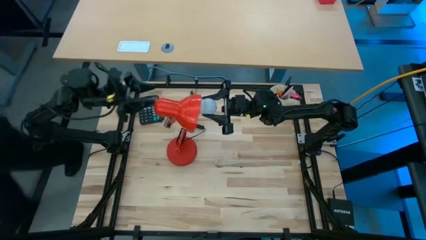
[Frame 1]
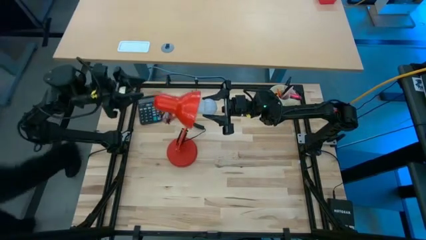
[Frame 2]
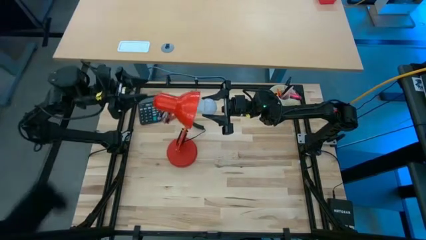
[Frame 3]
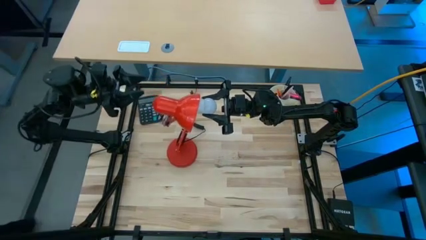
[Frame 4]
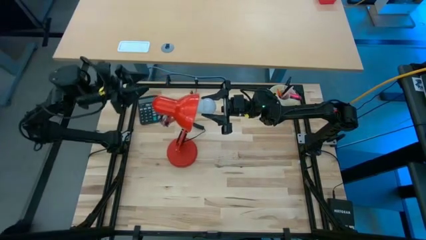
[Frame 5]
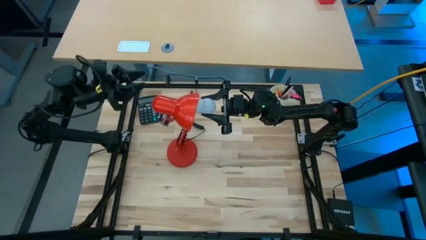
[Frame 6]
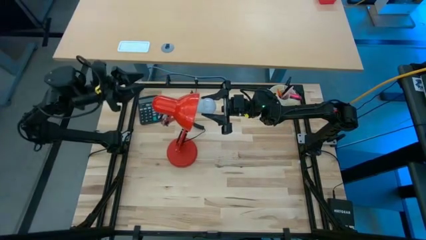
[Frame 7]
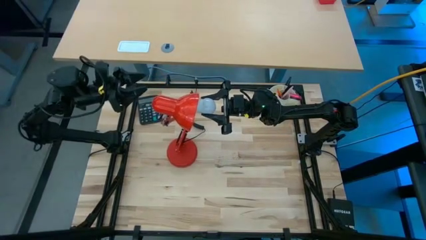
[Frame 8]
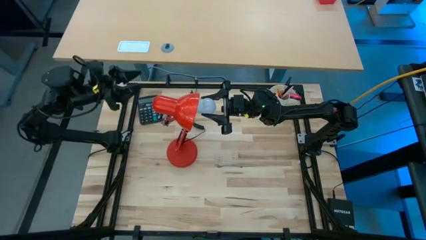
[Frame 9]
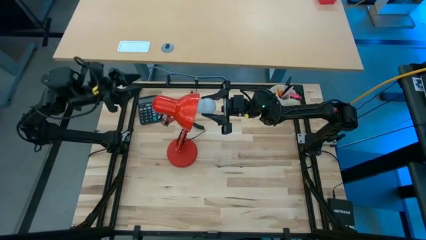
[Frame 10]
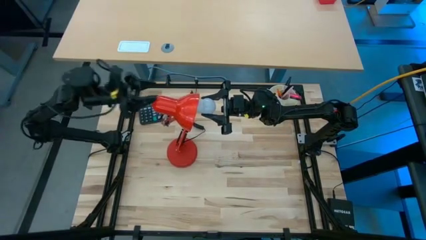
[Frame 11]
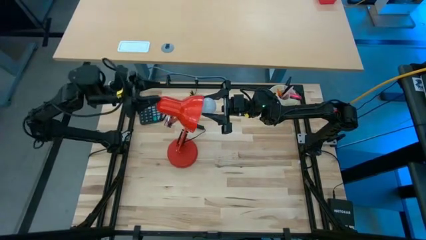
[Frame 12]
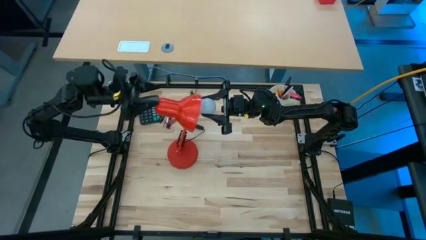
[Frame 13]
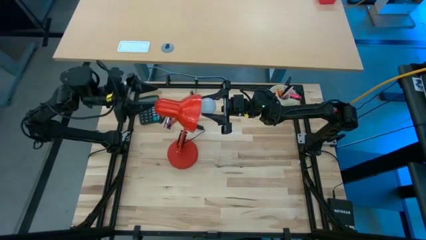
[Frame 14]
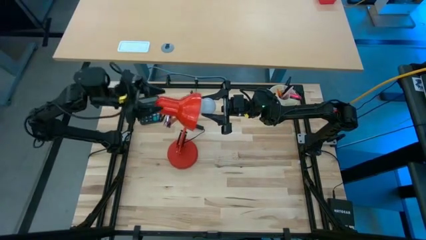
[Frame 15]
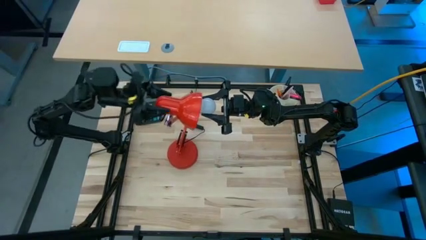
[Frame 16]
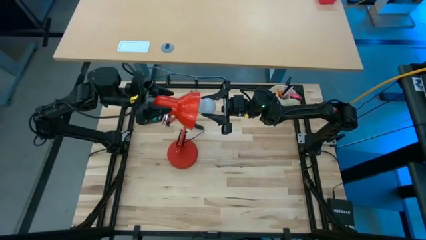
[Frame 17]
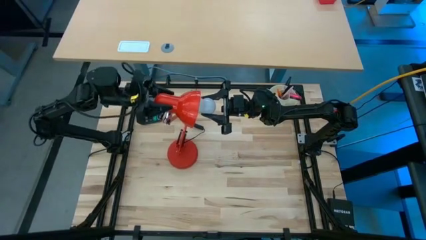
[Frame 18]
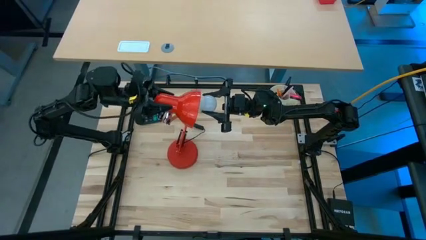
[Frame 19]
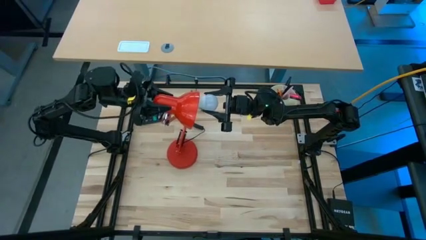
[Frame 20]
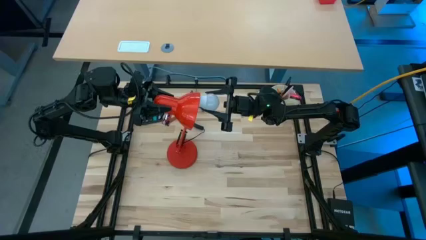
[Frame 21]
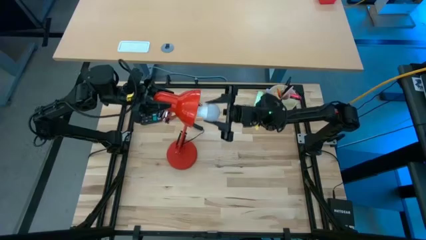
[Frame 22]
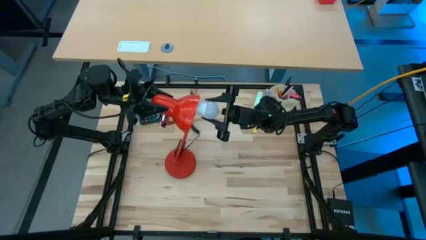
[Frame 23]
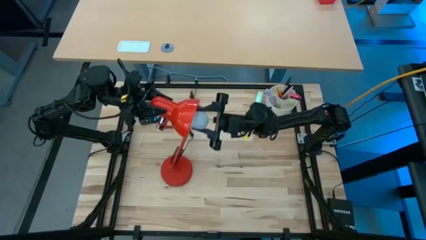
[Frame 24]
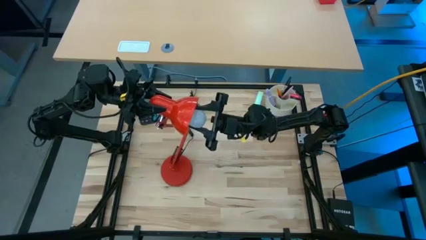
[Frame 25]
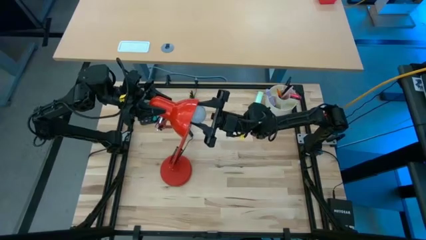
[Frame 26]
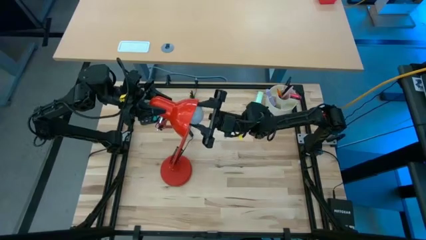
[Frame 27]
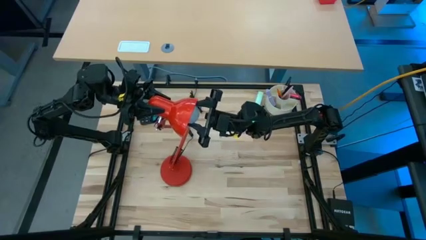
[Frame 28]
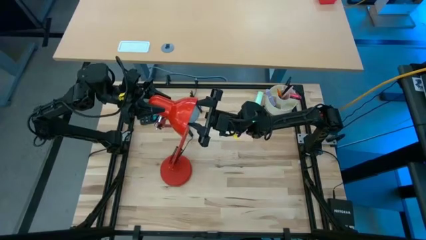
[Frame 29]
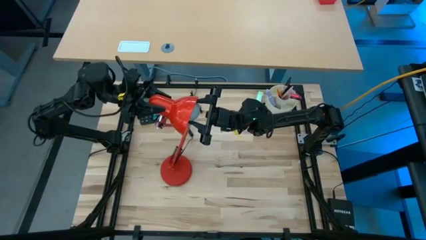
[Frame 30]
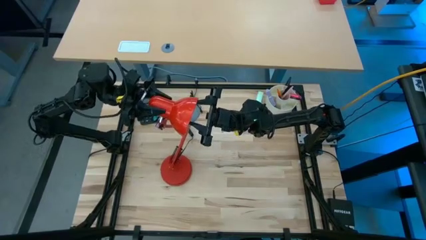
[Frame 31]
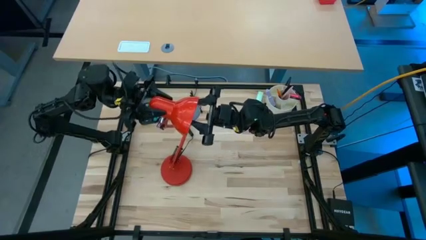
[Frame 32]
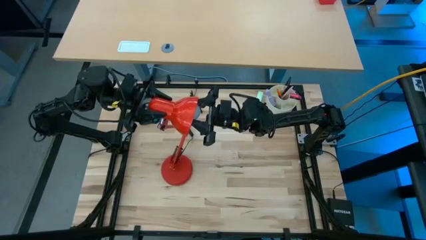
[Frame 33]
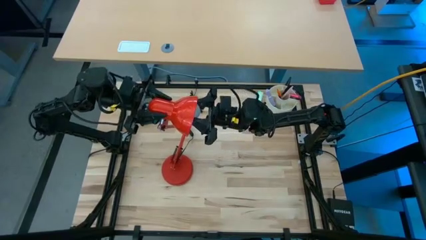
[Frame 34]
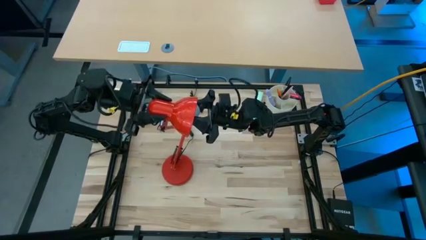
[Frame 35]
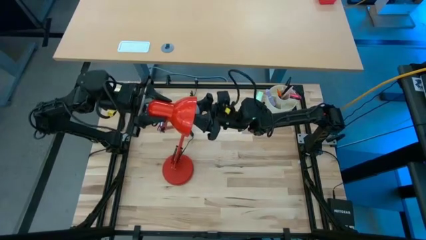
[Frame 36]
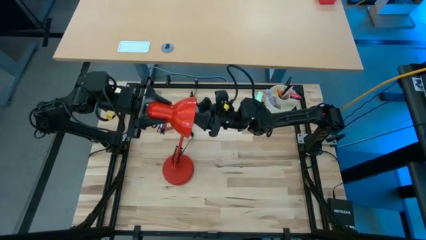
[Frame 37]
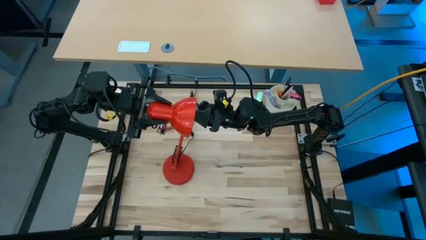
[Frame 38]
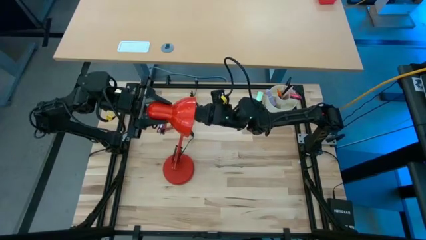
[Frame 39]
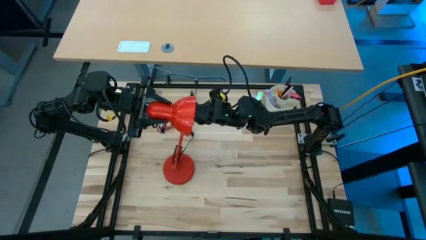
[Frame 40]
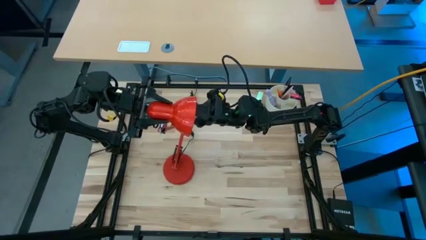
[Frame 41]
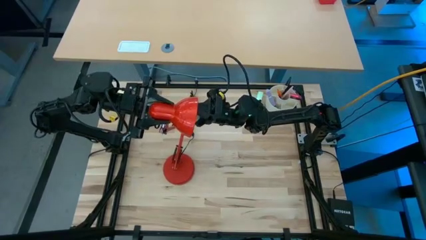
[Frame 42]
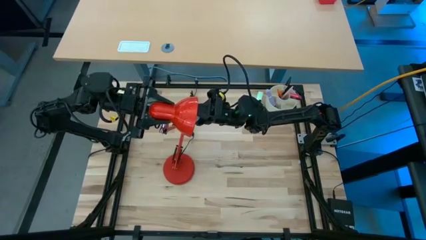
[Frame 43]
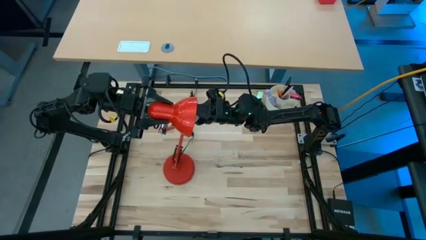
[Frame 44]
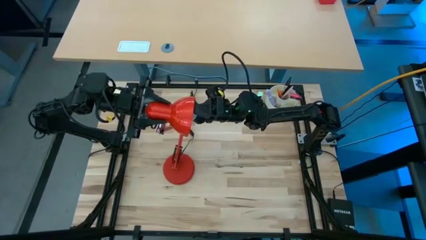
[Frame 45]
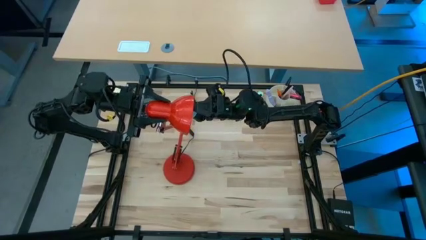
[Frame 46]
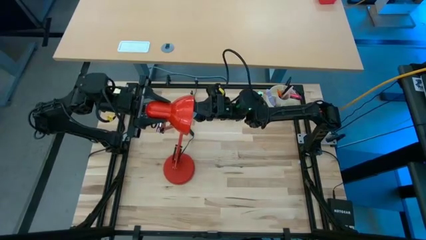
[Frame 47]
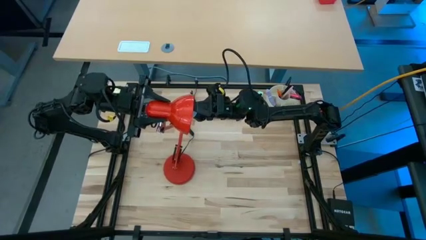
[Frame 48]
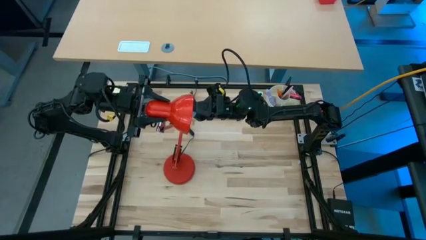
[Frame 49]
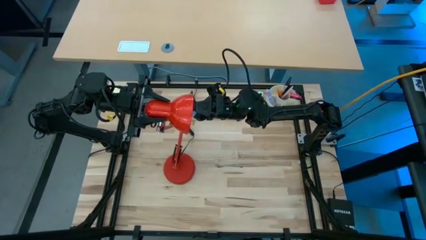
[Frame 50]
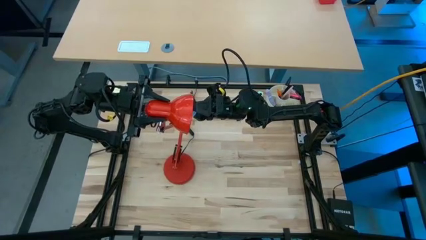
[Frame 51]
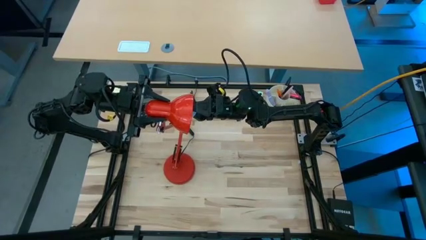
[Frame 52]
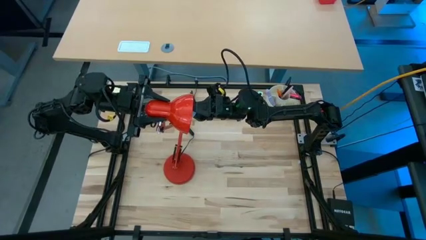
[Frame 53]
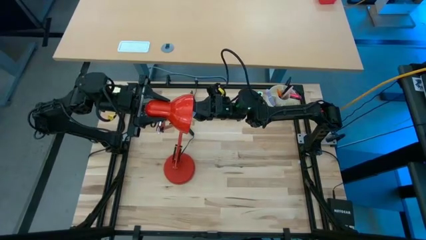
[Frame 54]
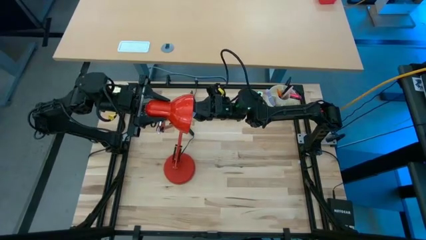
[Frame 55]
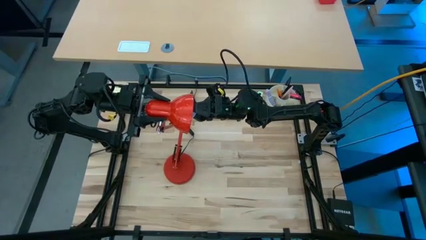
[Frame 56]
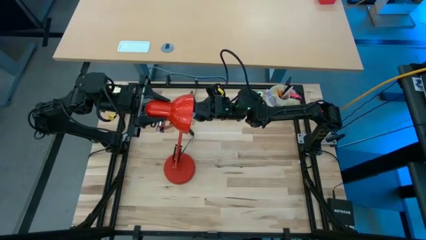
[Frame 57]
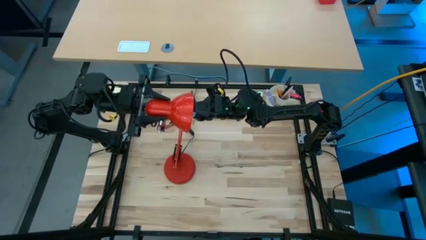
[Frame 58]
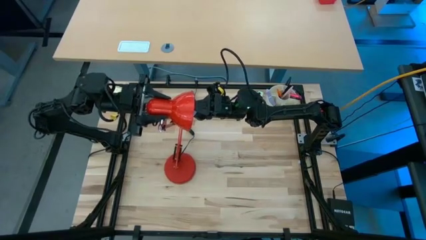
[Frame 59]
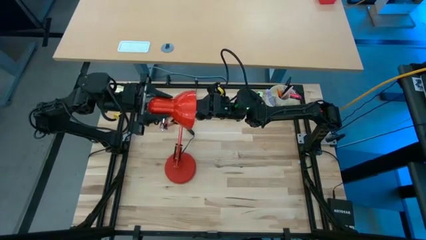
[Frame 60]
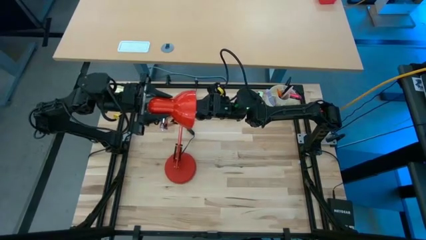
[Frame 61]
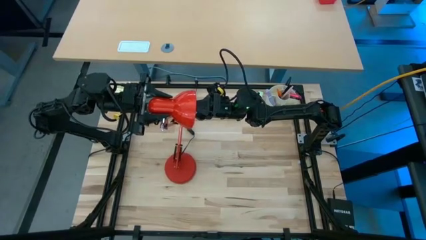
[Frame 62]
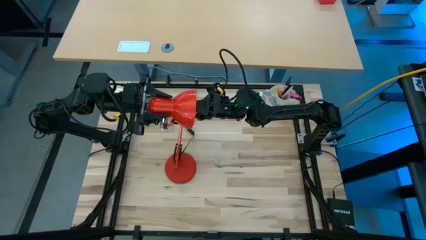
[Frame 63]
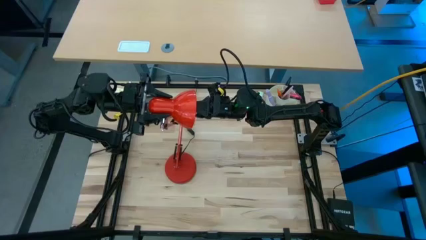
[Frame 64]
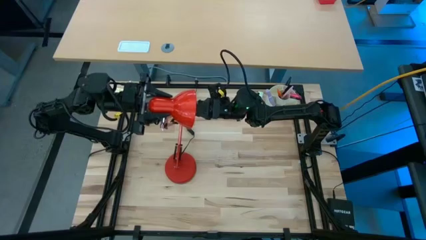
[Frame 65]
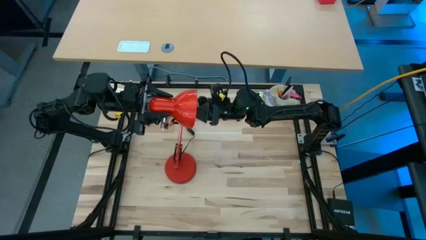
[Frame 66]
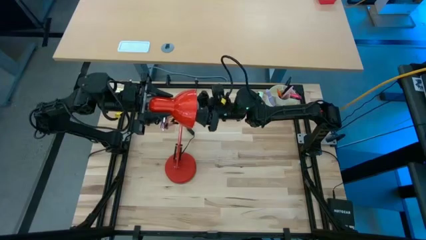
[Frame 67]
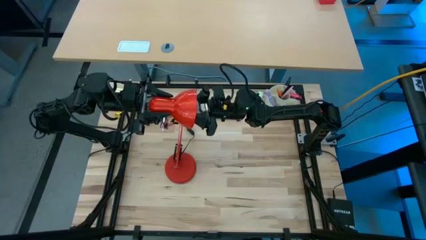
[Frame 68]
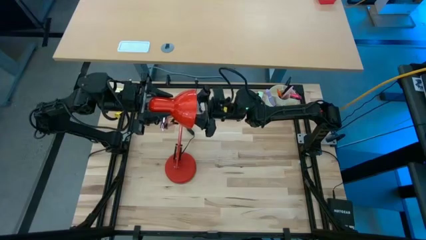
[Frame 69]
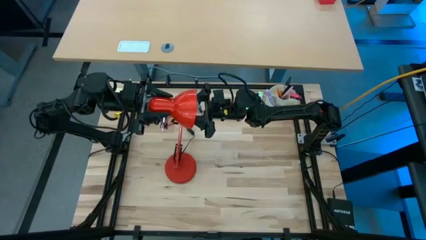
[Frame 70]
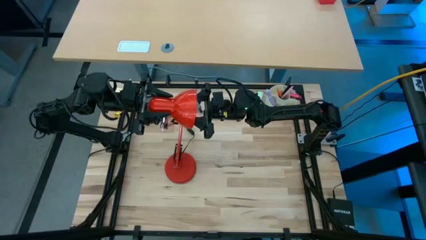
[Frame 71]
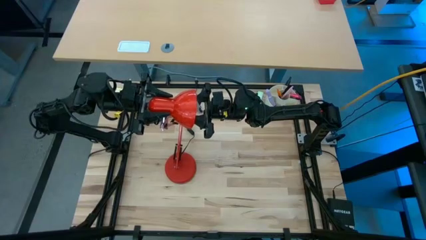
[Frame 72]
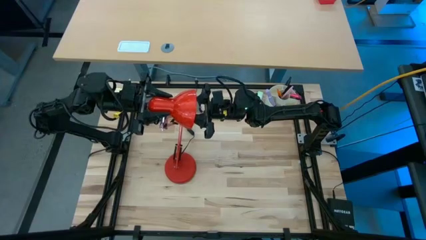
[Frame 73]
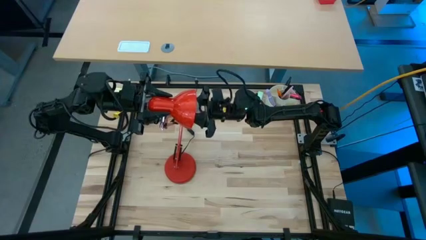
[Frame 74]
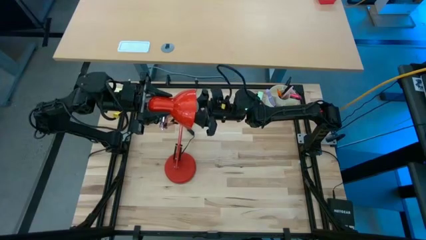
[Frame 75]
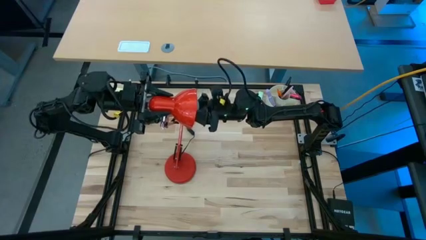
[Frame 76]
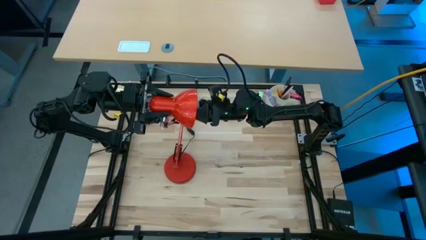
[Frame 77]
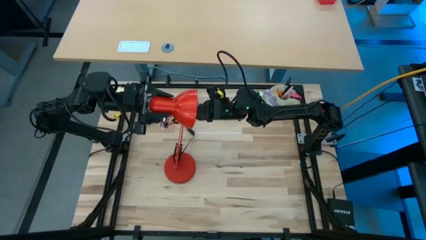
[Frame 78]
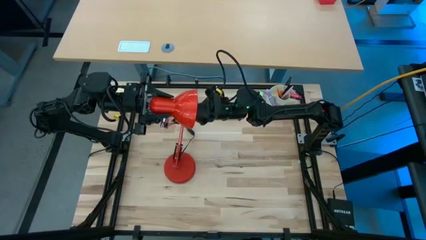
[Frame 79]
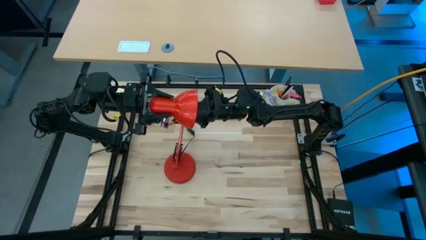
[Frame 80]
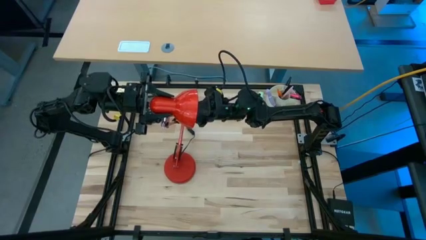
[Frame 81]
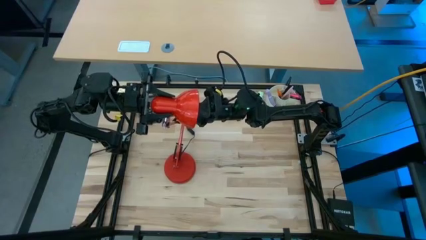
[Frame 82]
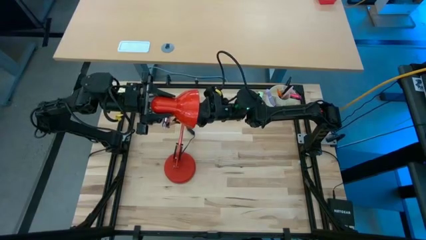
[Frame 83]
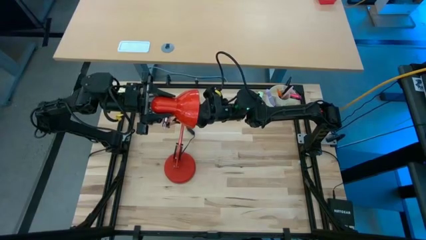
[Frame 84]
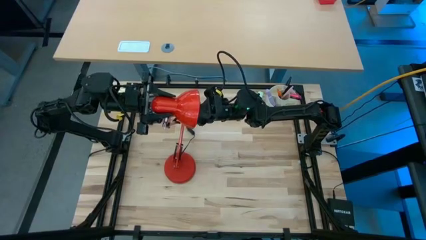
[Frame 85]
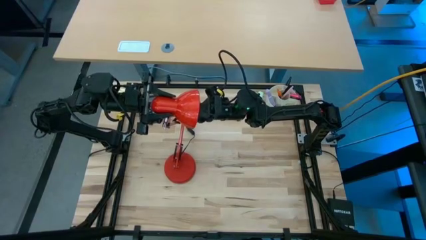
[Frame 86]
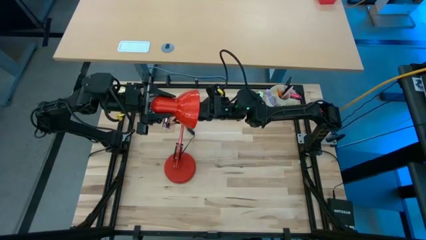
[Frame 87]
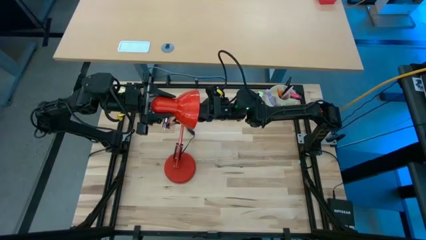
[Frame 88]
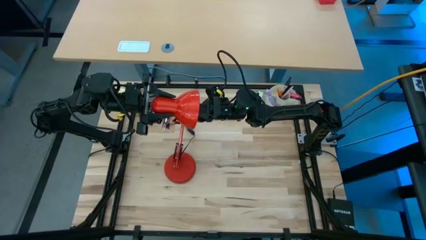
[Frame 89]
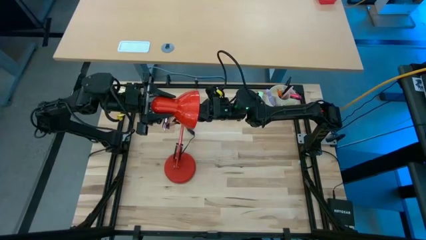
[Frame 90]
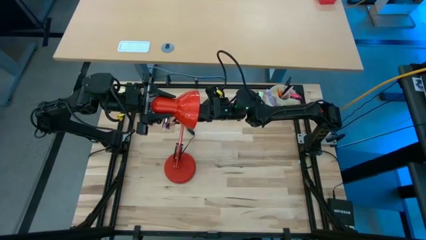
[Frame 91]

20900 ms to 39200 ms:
Task: Screw lightbulb
Insert the white lightbulb into the red desk lamp
